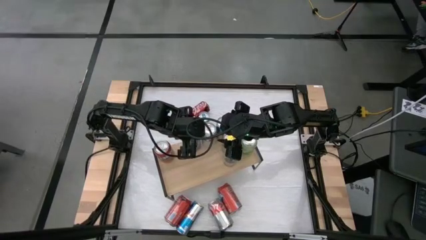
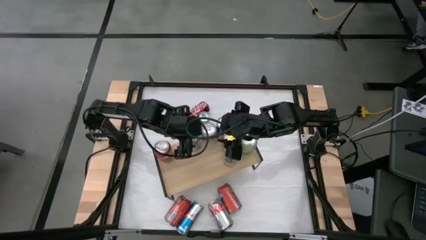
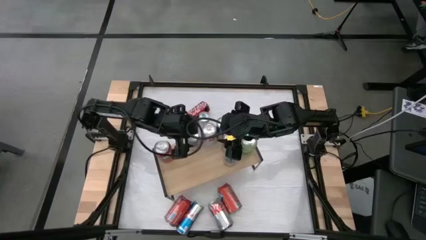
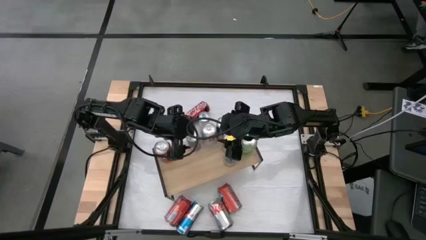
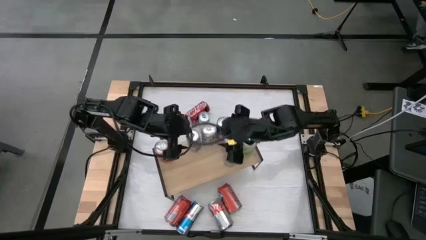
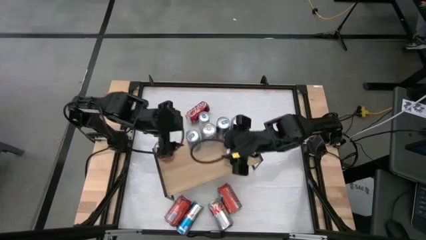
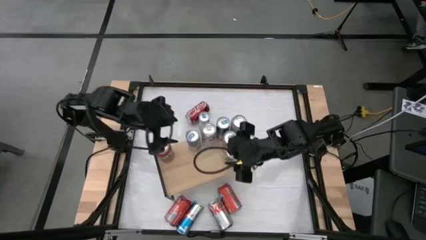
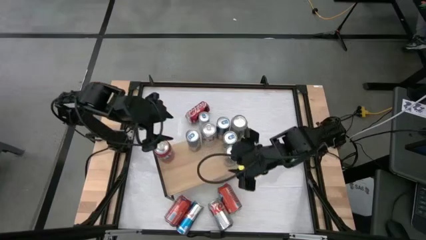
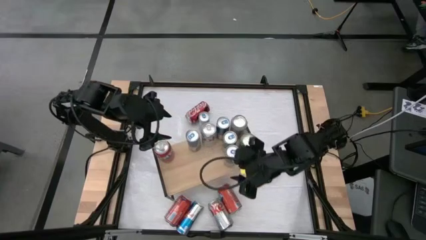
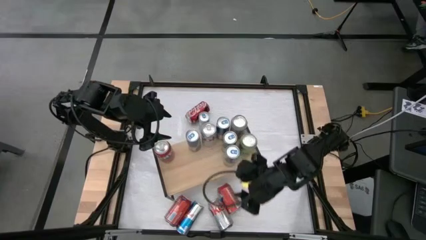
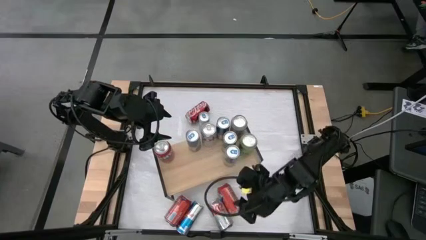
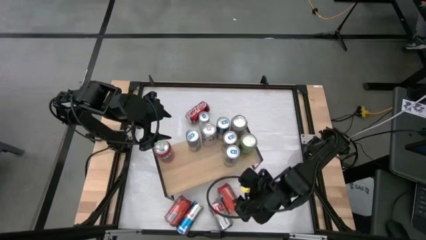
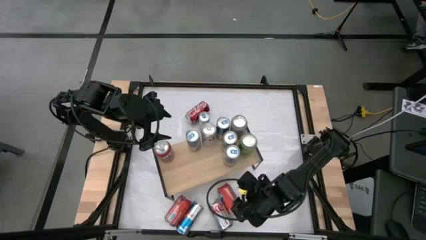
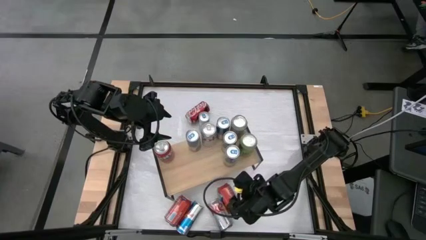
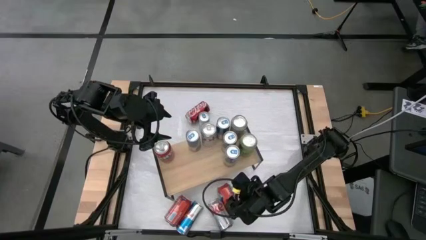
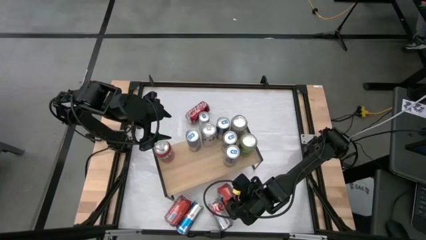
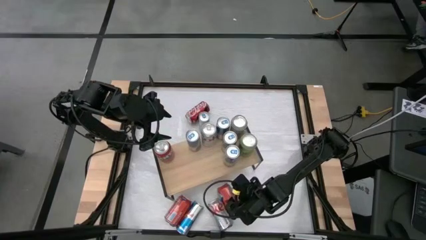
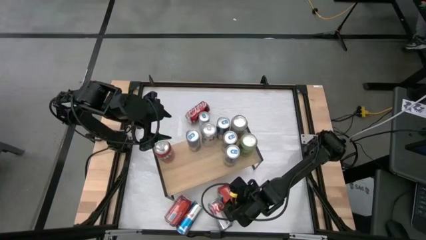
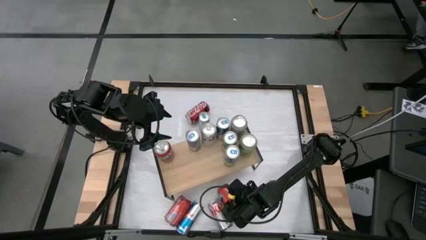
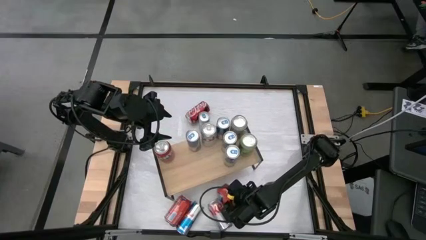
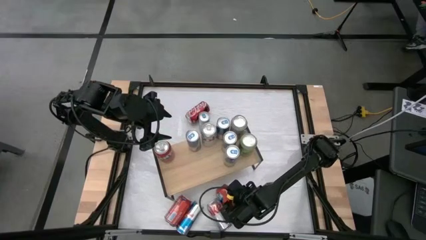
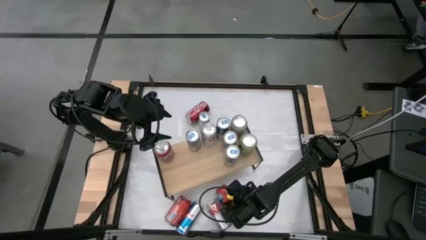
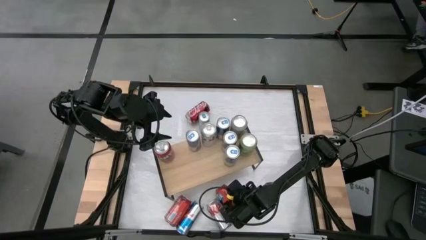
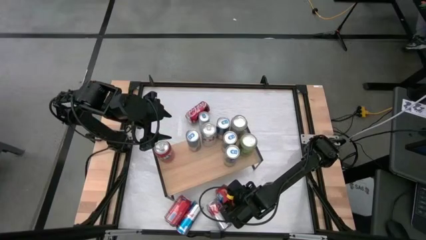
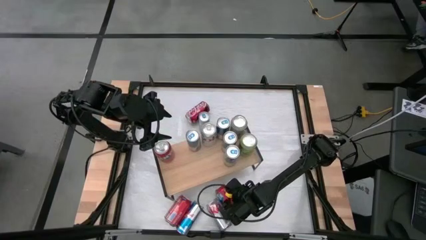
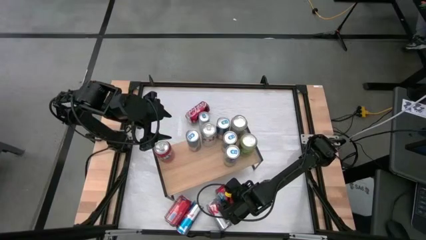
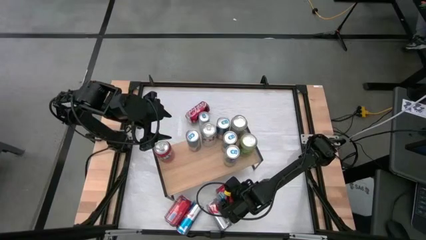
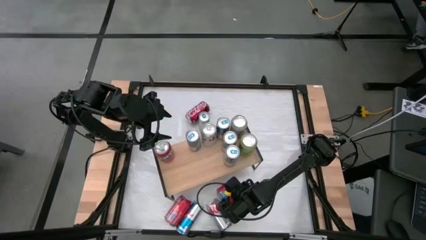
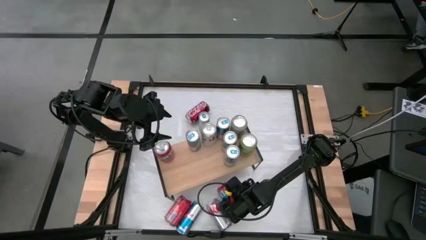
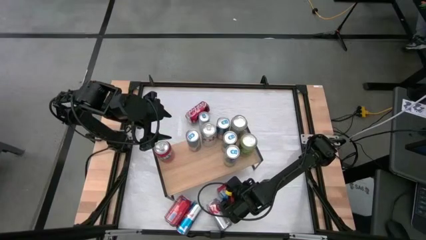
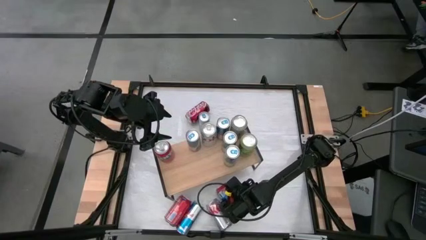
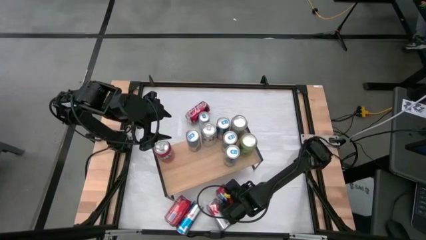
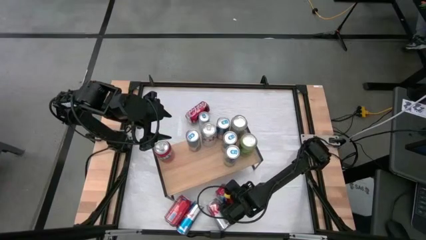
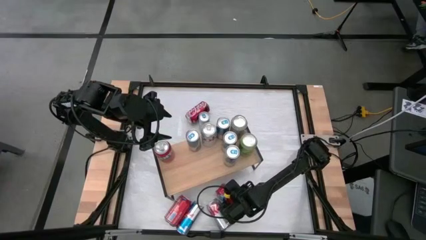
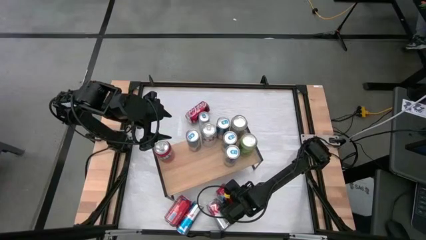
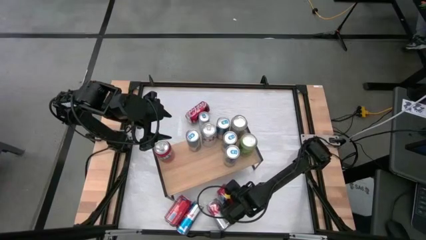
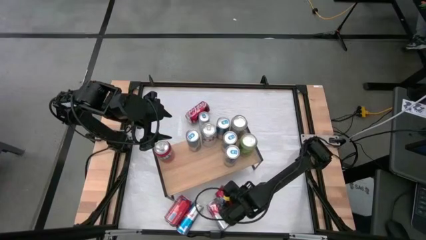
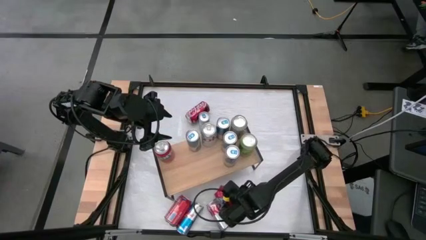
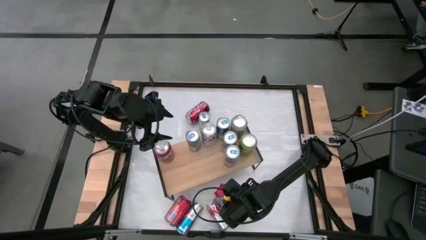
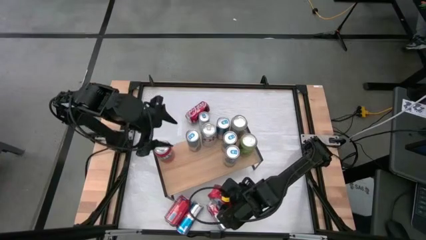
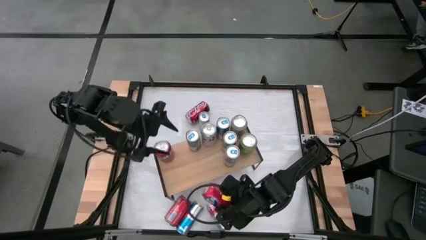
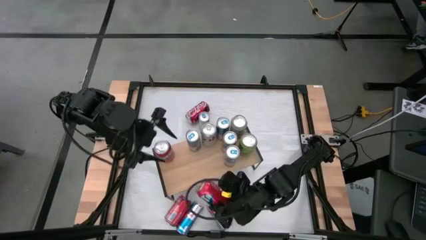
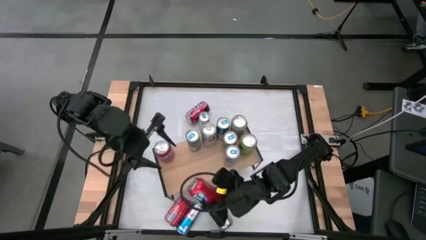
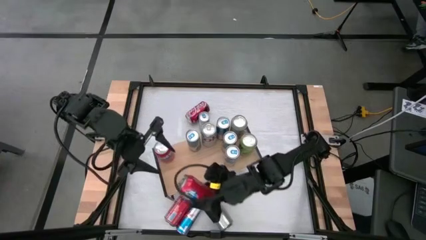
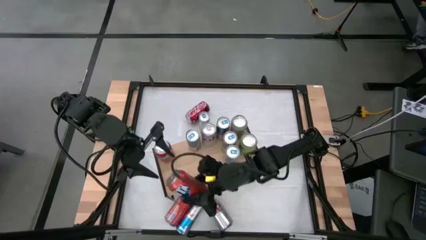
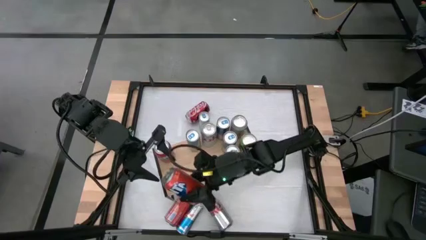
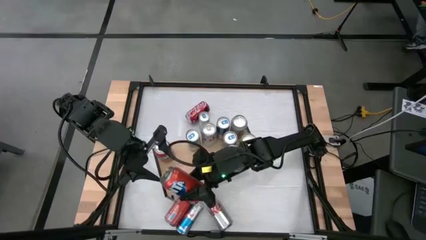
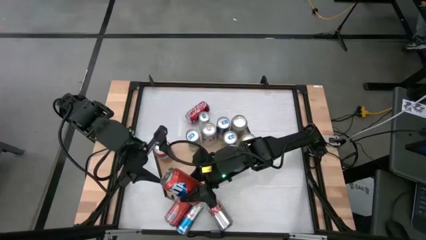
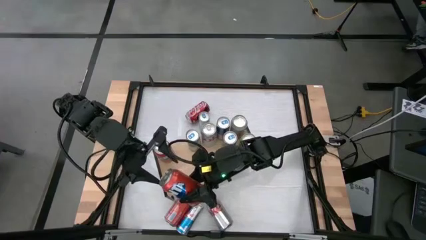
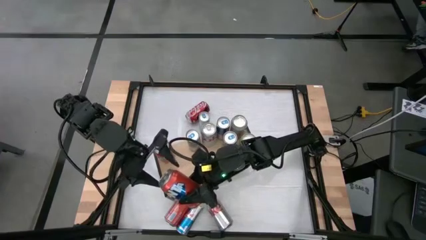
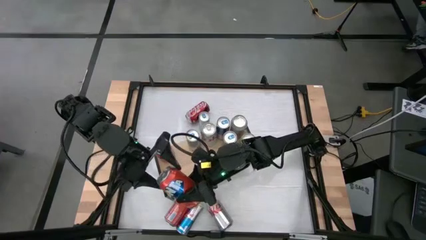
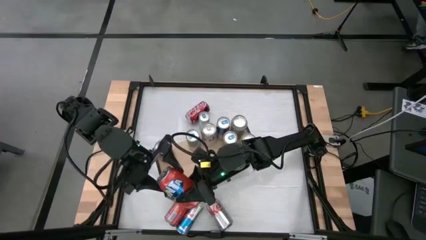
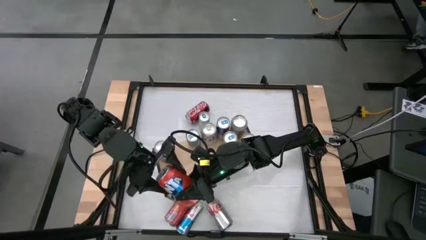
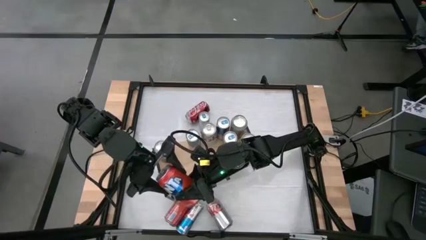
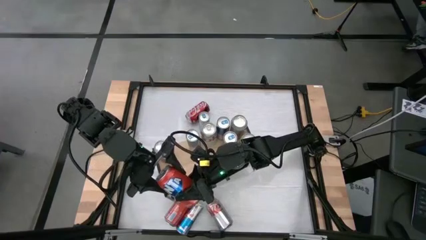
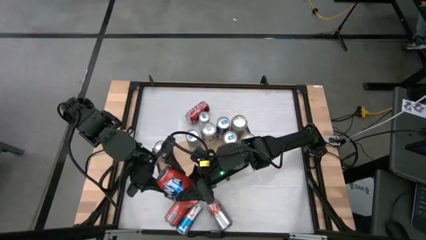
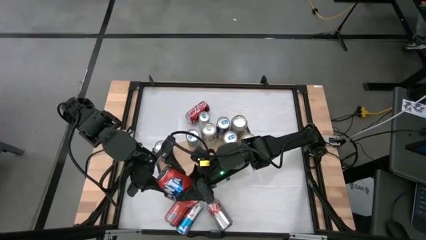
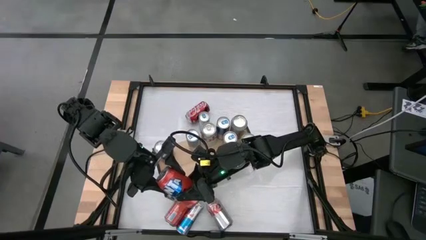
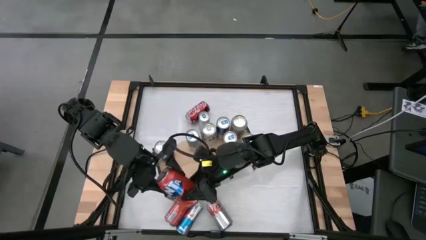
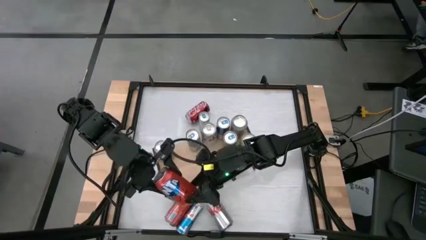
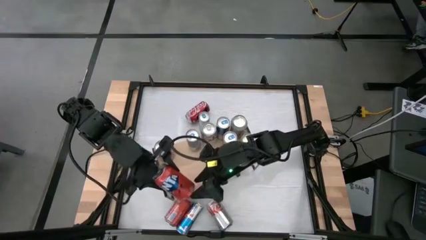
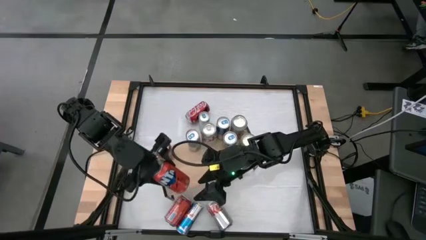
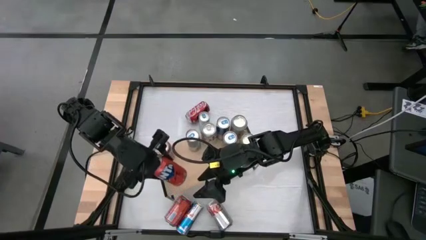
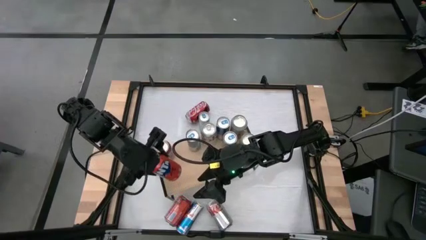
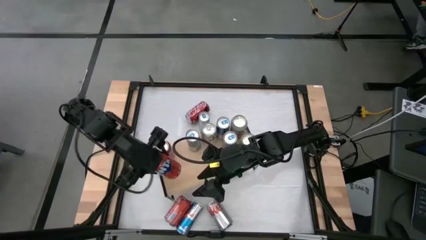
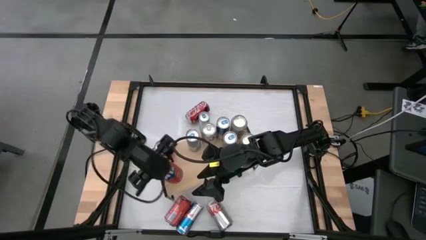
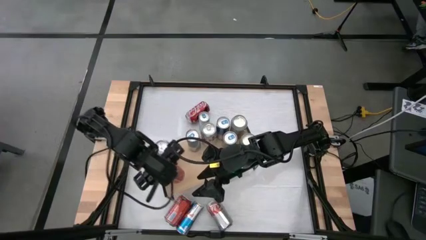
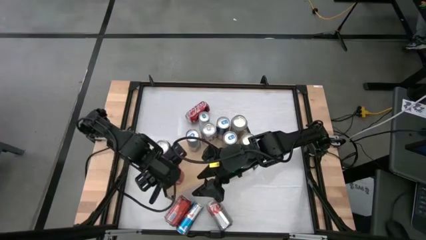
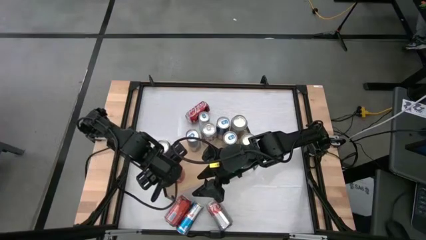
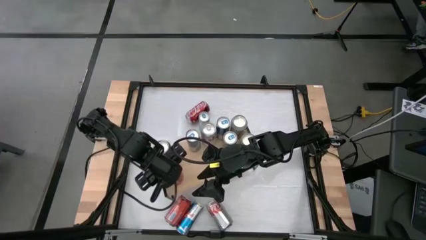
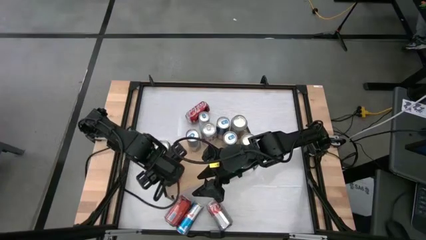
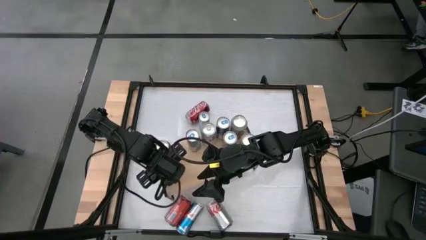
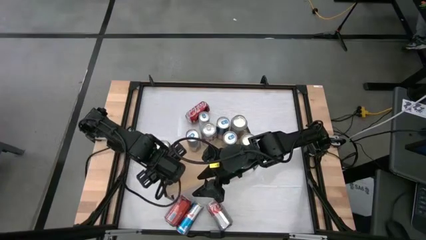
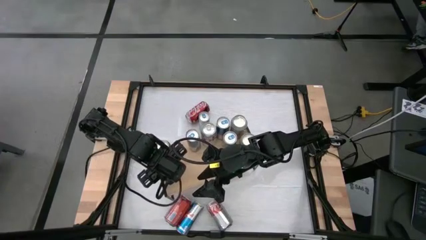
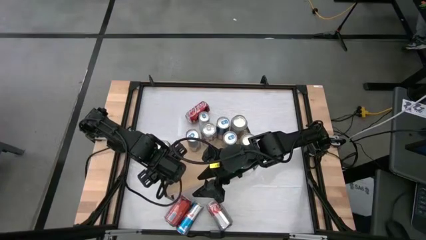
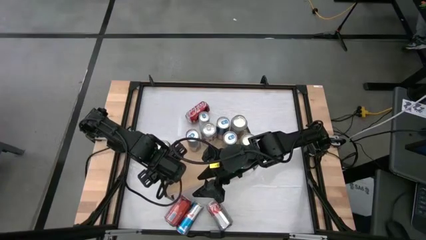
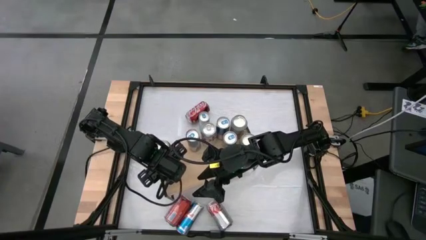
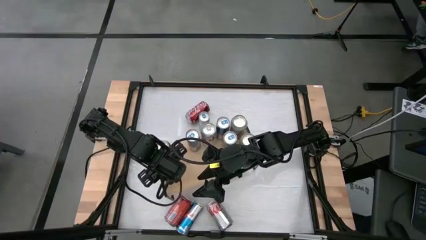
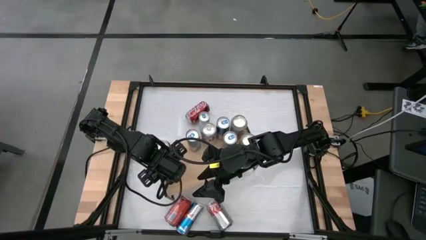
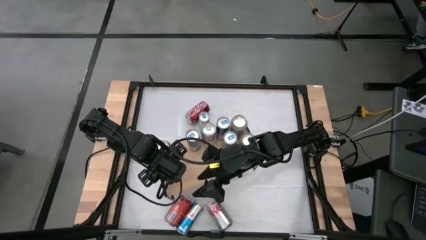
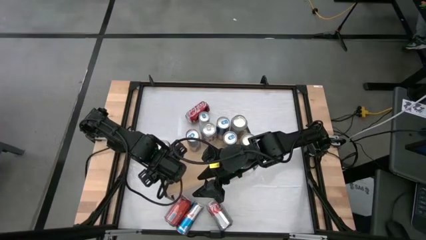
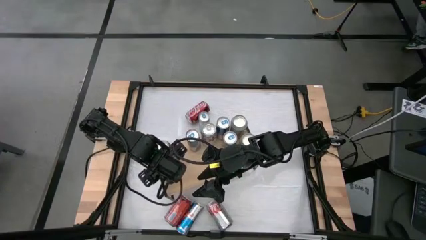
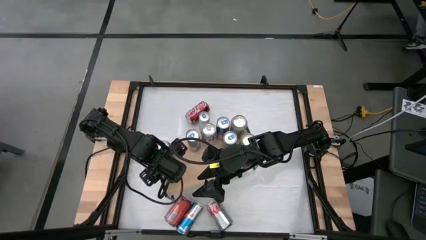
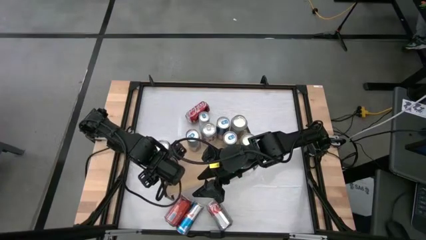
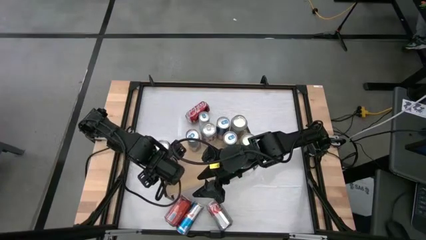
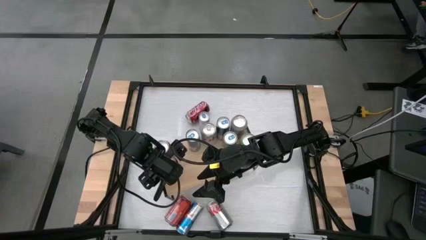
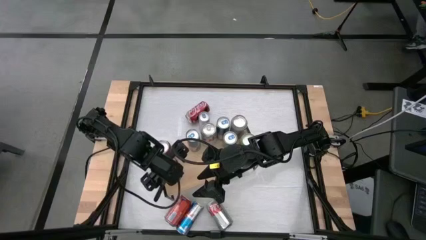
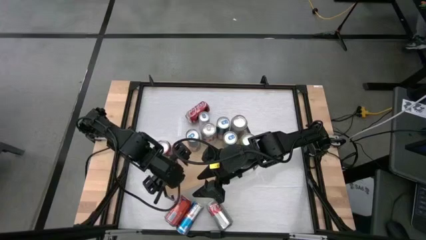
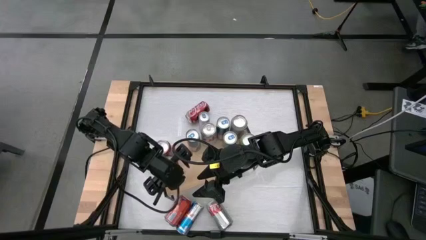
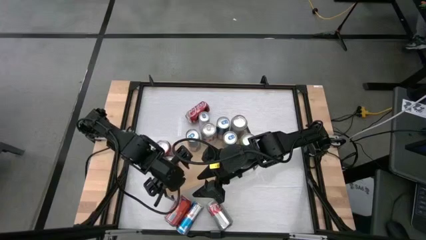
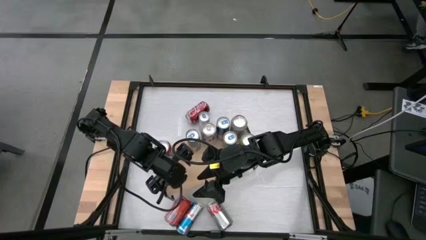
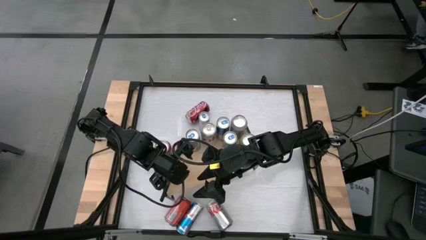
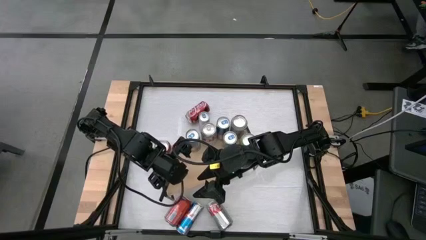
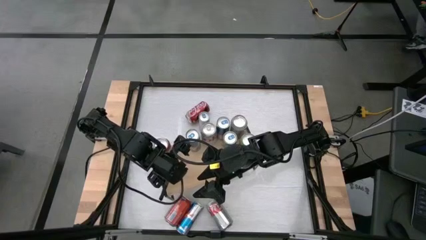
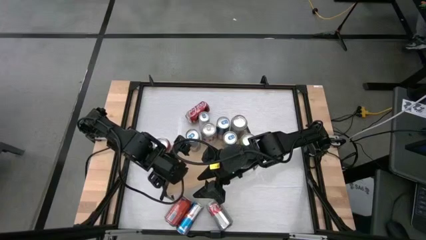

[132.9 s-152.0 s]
Task: Place canned beverage on shelf
Put the red soda can on the shelf aligned with the other red soda can
